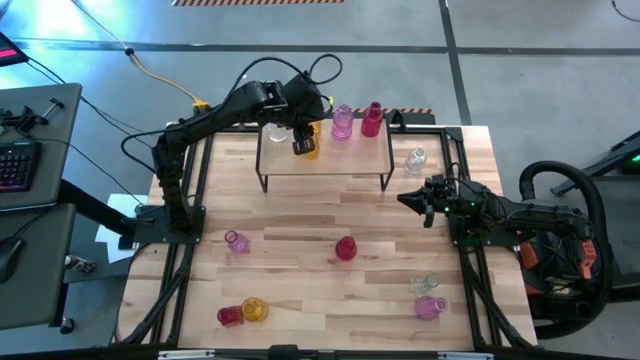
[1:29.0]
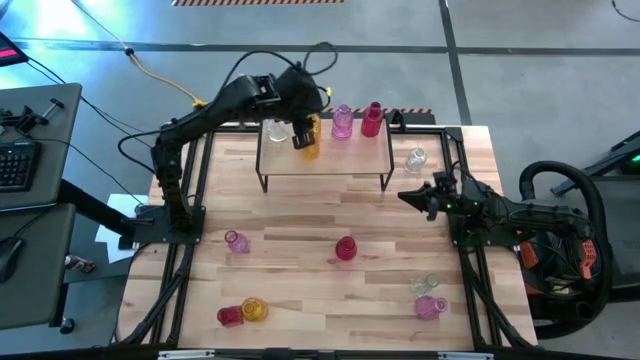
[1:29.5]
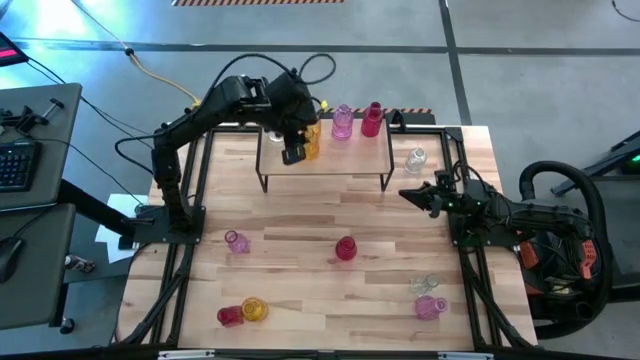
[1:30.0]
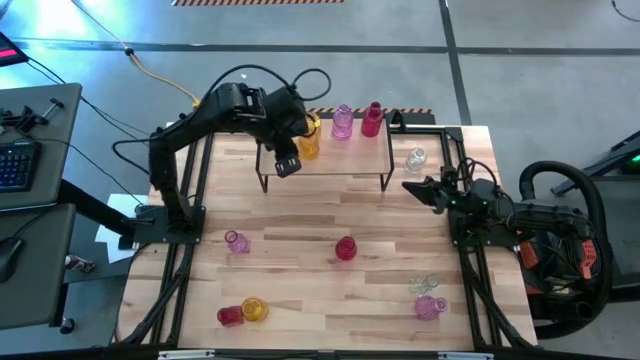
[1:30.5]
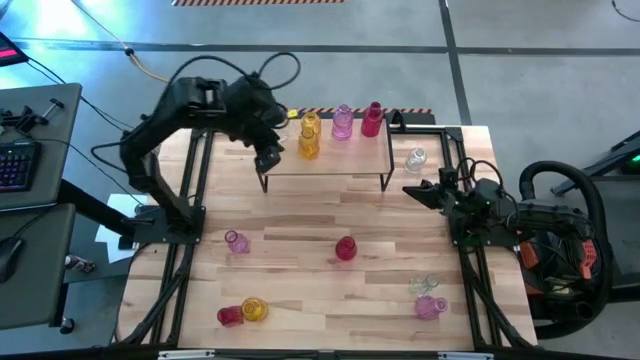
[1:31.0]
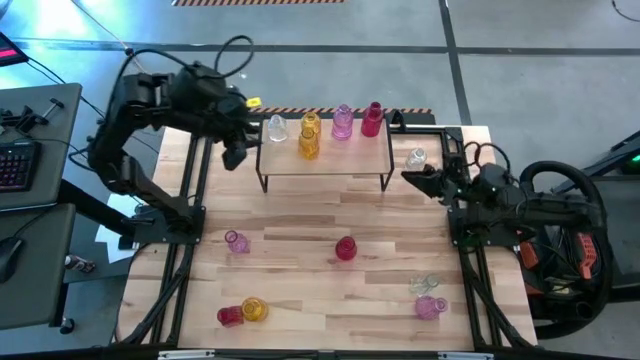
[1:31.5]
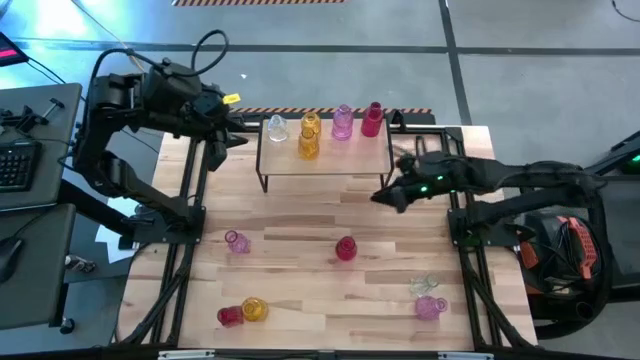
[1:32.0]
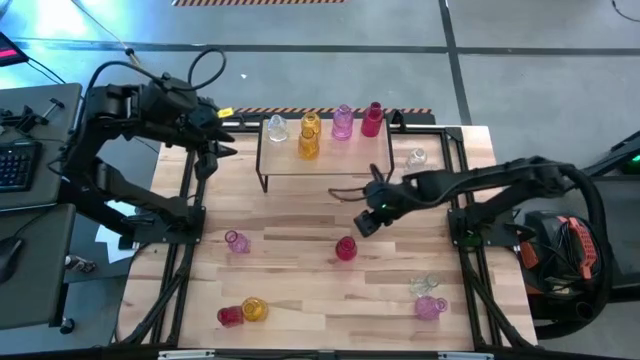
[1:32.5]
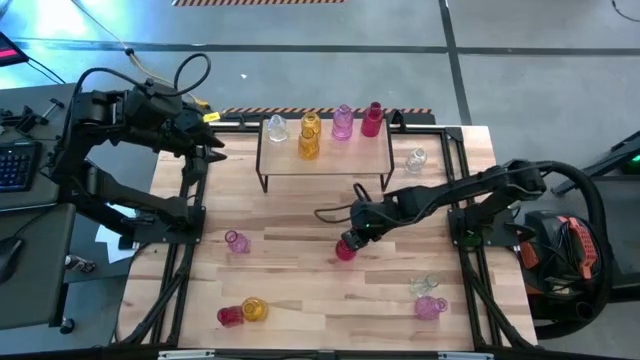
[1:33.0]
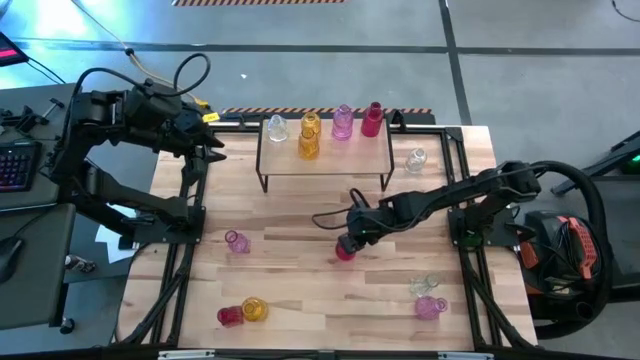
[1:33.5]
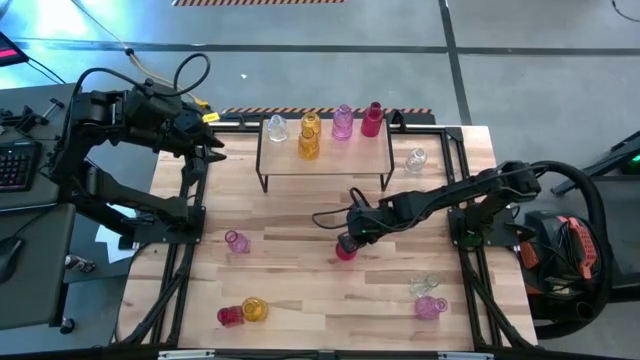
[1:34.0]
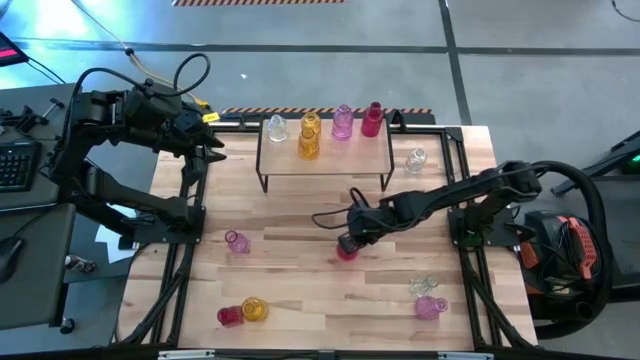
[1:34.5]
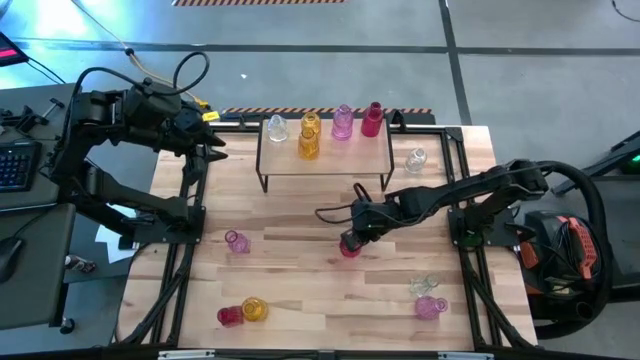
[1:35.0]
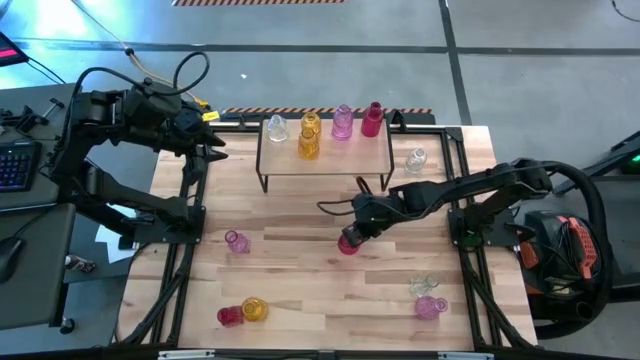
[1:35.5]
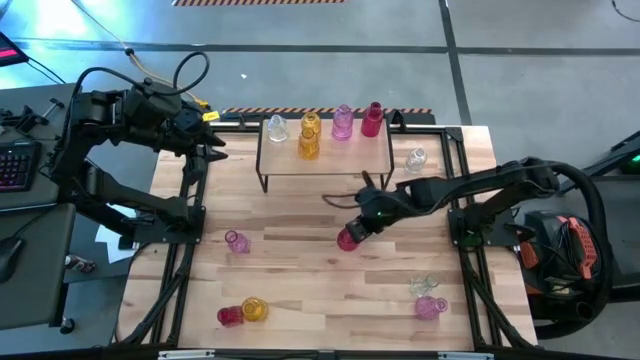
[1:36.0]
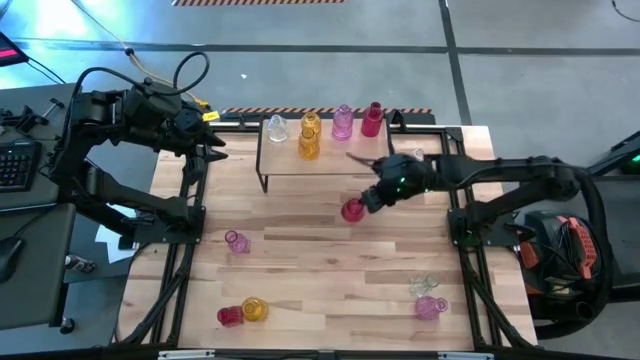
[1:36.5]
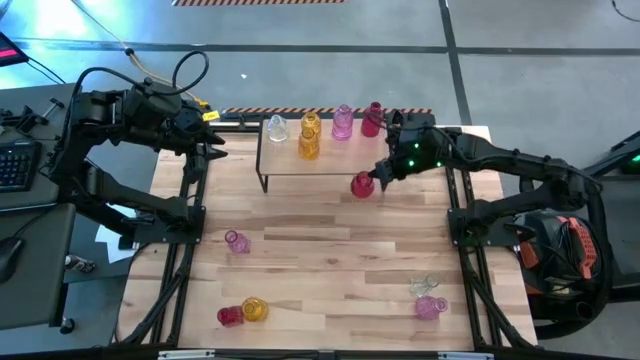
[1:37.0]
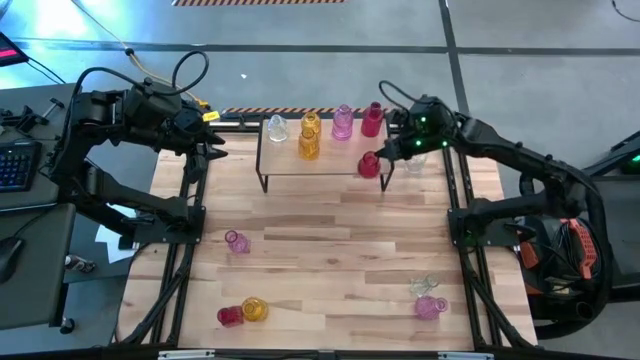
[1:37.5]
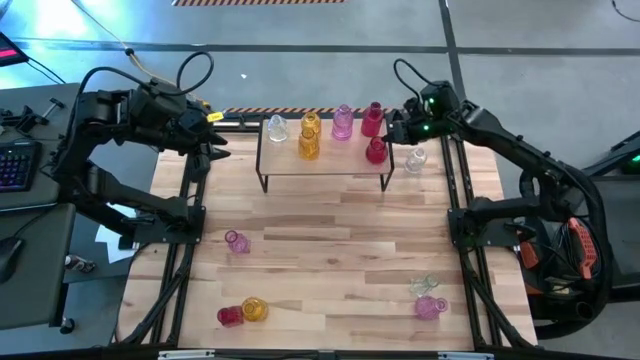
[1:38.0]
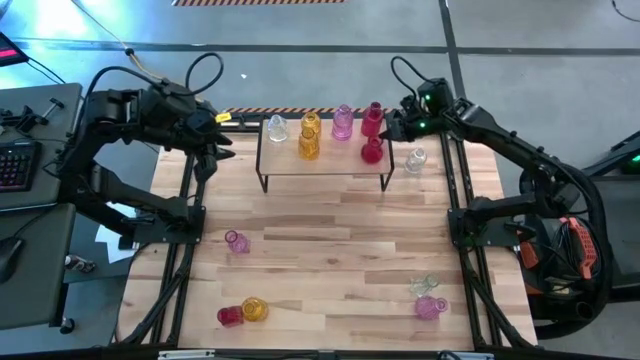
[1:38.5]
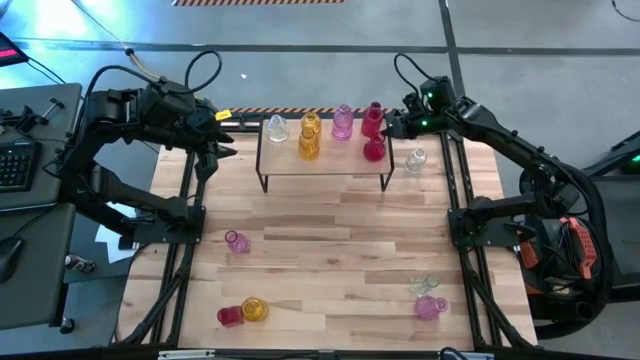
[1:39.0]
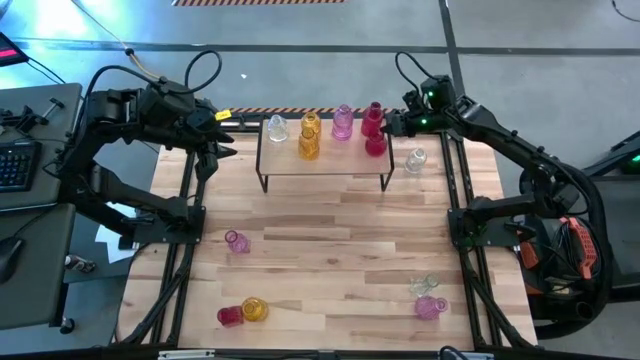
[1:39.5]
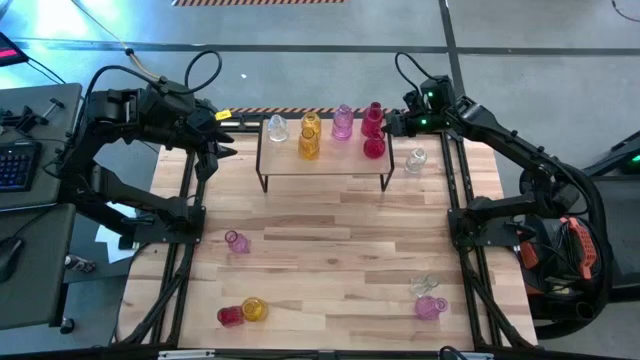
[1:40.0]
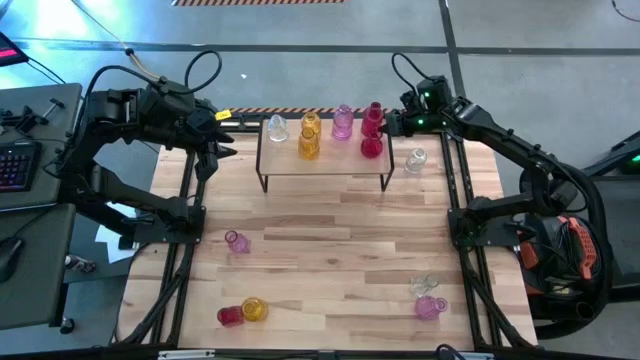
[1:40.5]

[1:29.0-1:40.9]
Task: sort vases onto shelf
Put the red vase aligned with the other red vase on the shelf

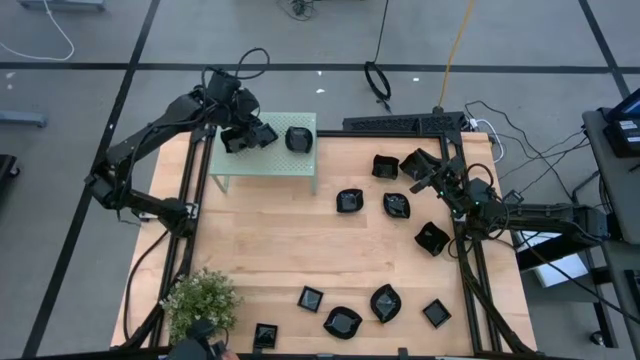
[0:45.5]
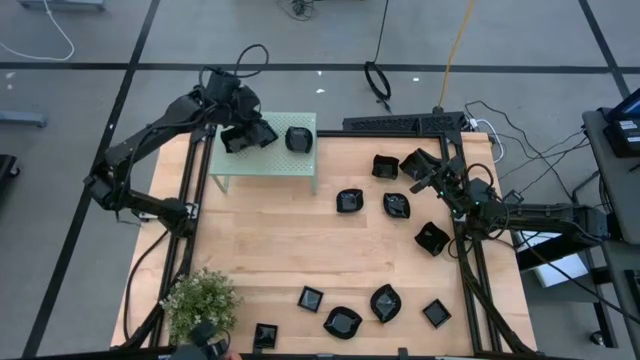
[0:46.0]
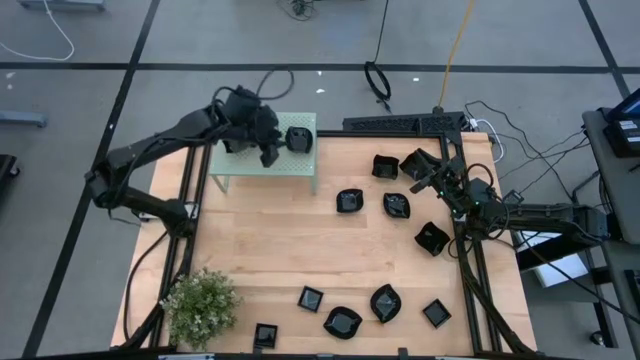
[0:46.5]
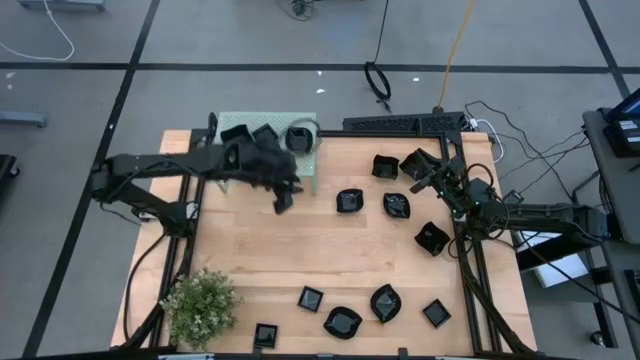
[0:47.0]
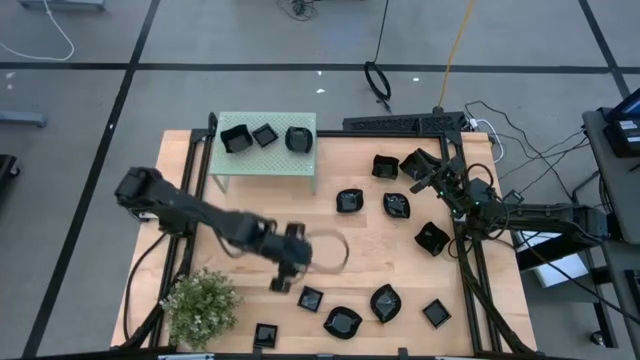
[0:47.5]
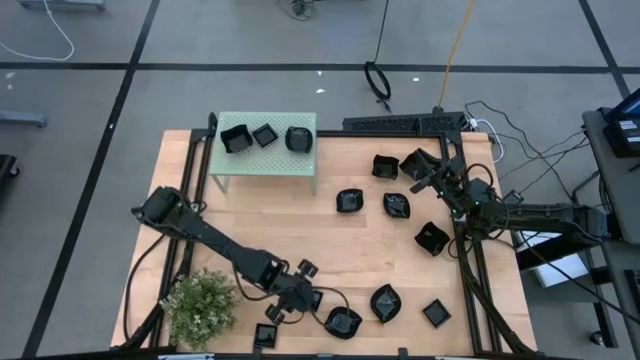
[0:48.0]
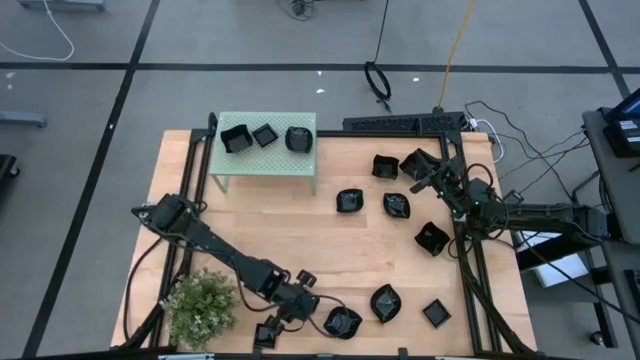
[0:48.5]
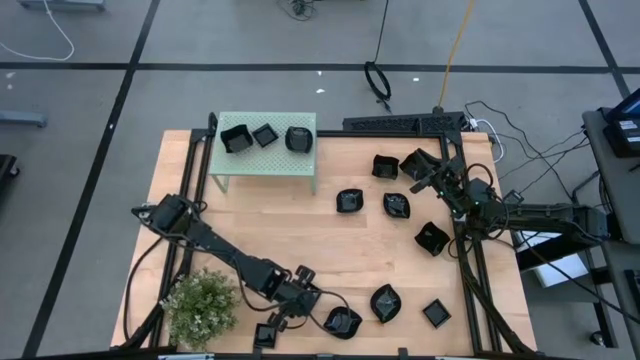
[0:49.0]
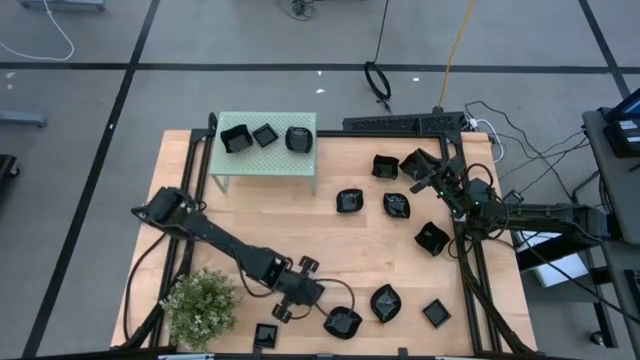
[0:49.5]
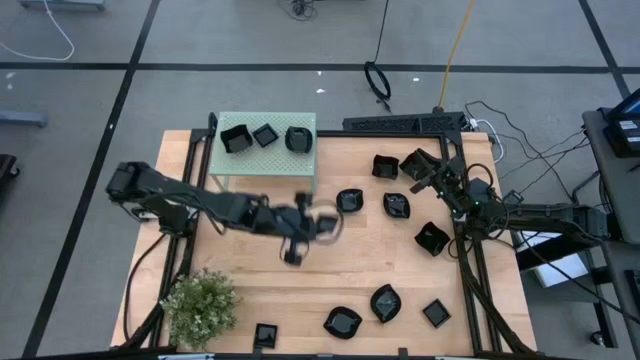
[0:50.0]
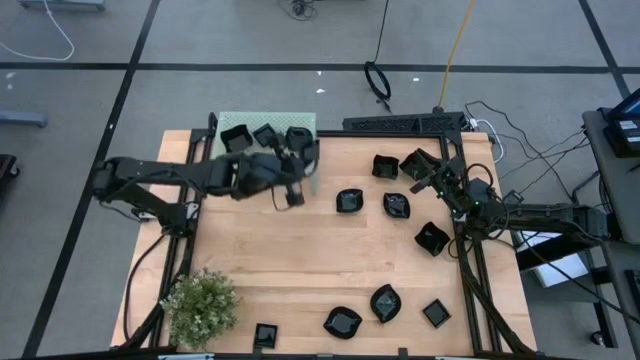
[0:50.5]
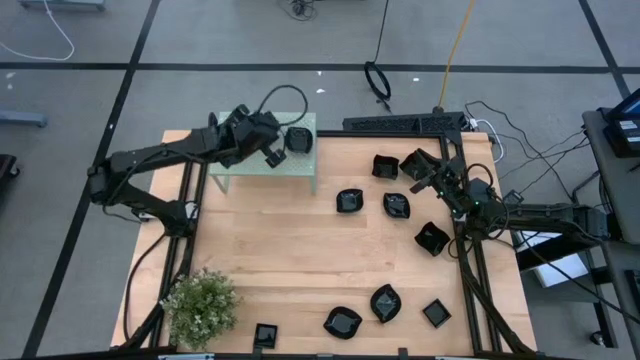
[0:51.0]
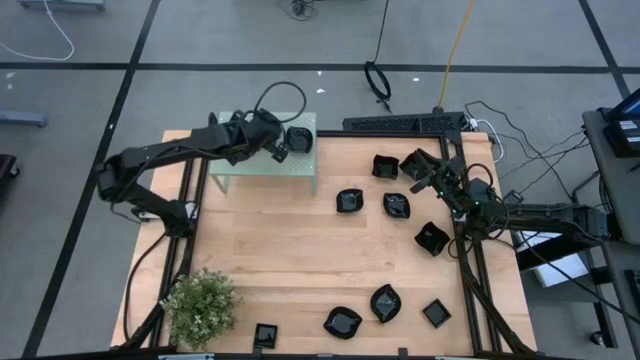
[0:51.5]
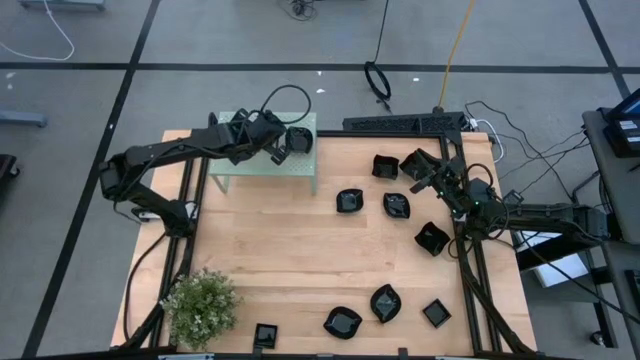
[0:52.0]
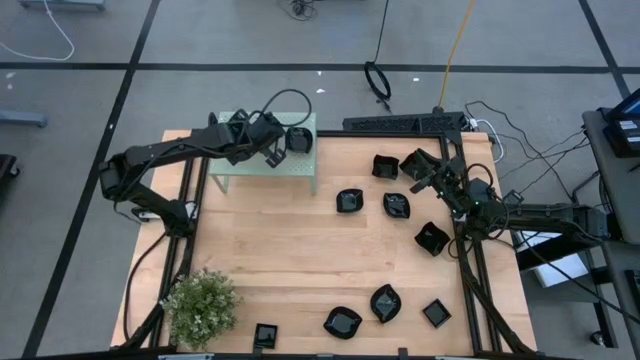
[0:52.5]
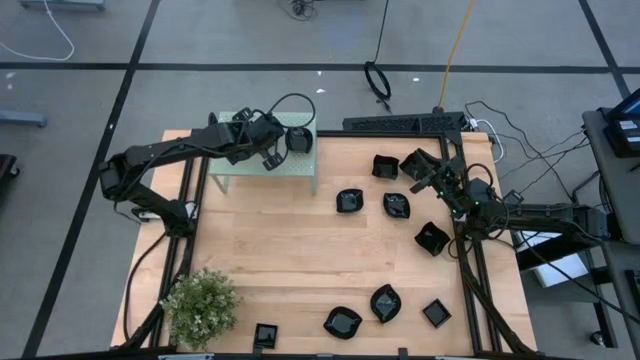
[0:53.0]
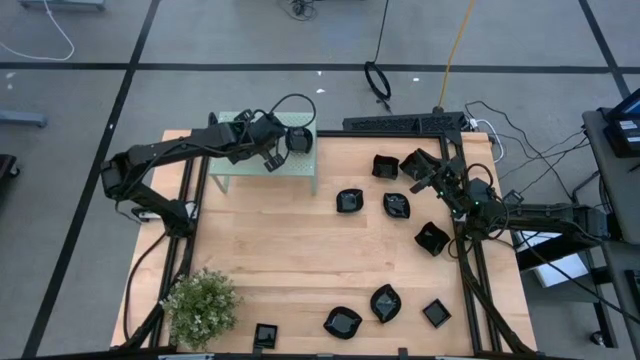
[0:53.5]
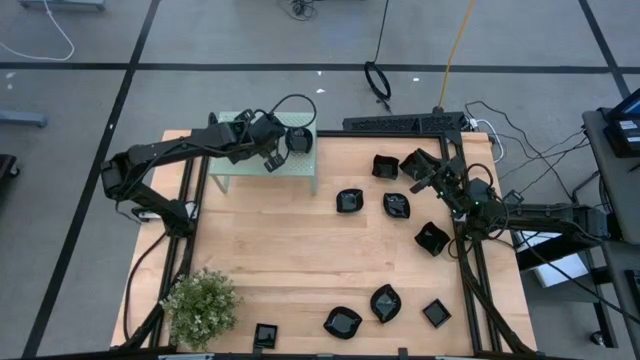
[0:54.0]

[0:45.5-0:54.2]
Task: Pick & Place Mini shaped plates
Stack the top left square plate on top of the square plate on the shelf
